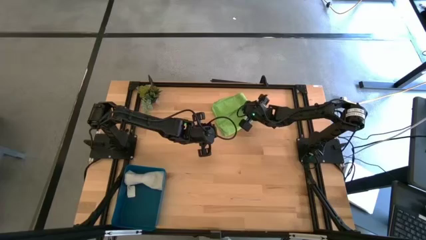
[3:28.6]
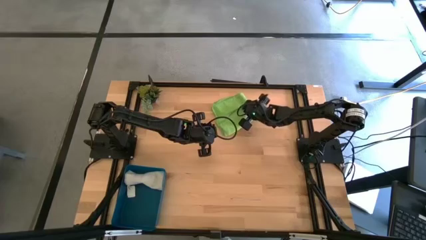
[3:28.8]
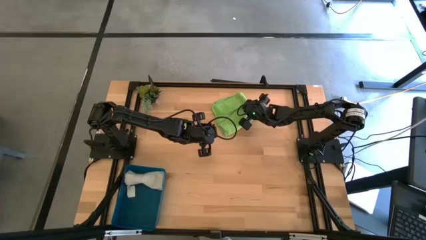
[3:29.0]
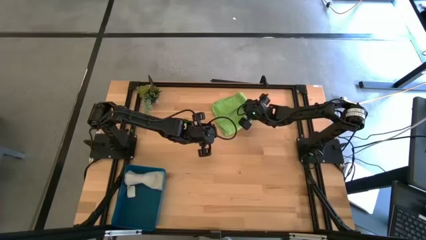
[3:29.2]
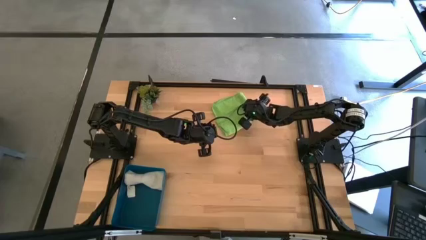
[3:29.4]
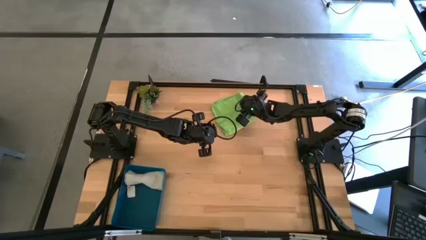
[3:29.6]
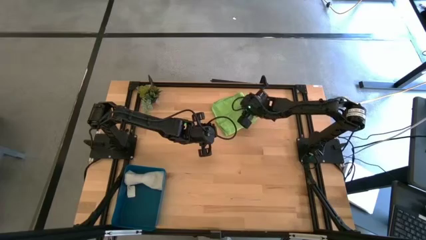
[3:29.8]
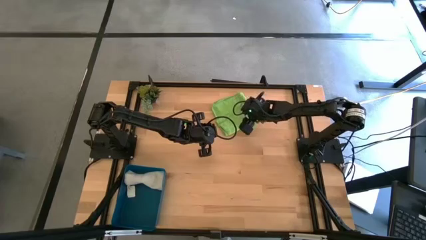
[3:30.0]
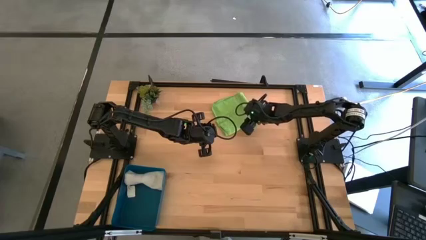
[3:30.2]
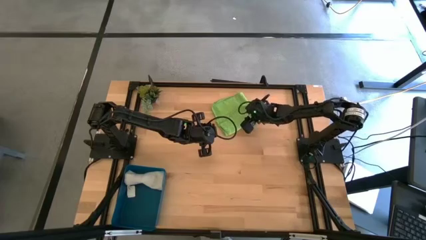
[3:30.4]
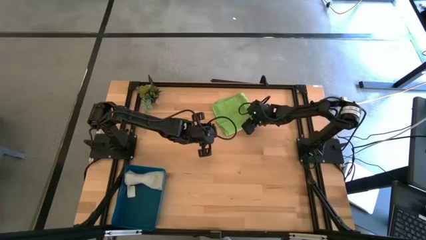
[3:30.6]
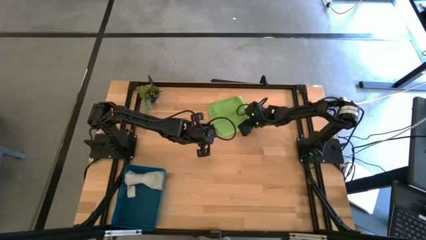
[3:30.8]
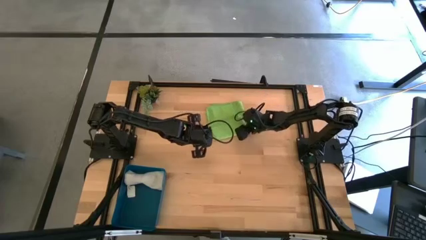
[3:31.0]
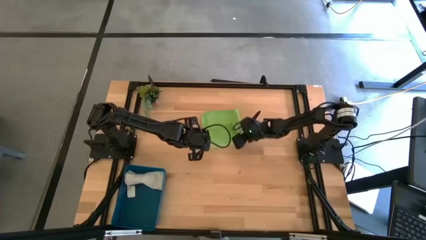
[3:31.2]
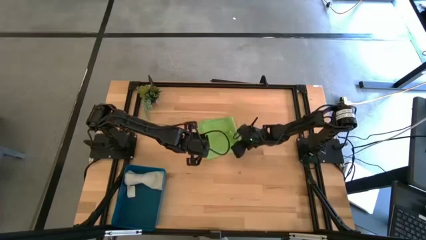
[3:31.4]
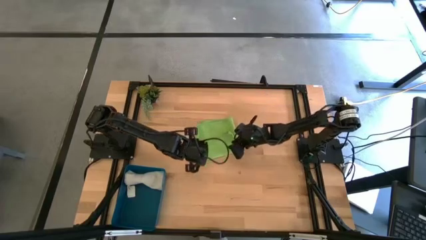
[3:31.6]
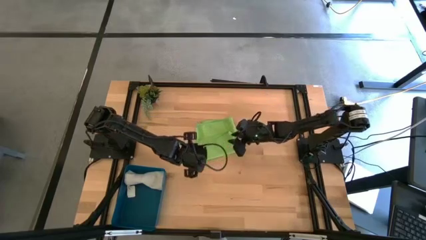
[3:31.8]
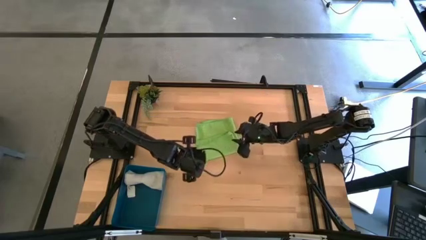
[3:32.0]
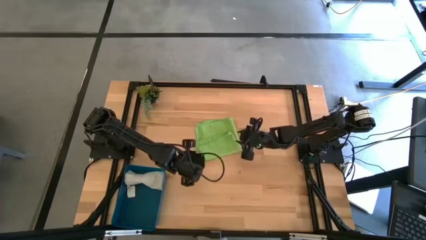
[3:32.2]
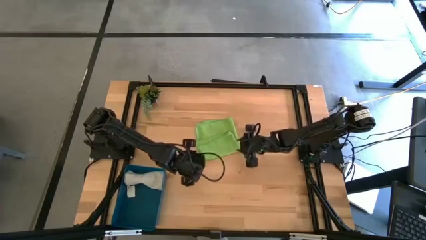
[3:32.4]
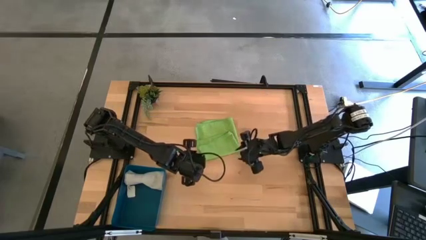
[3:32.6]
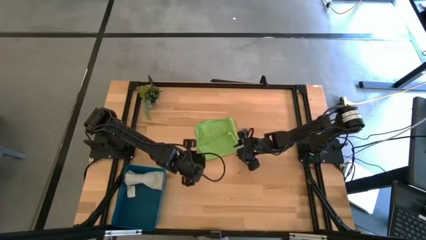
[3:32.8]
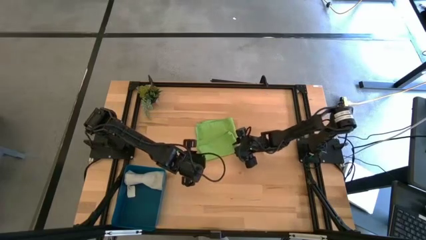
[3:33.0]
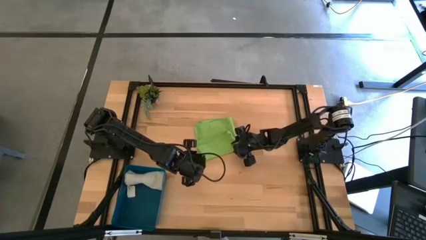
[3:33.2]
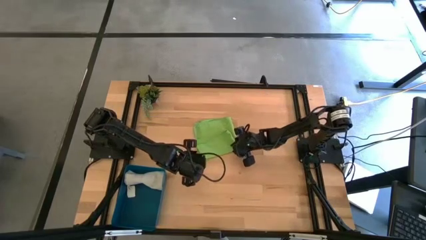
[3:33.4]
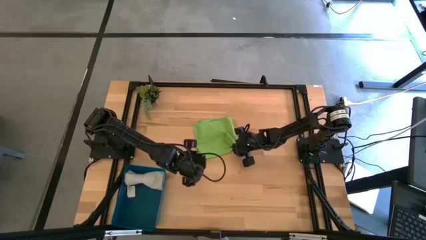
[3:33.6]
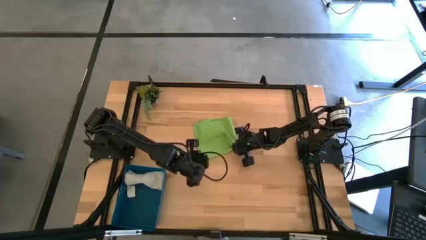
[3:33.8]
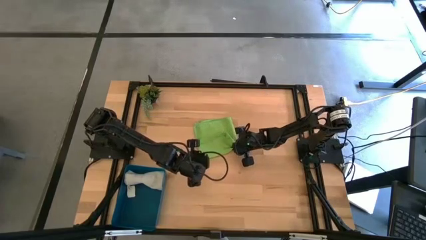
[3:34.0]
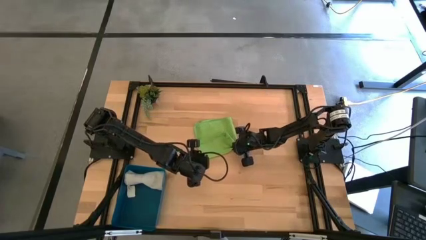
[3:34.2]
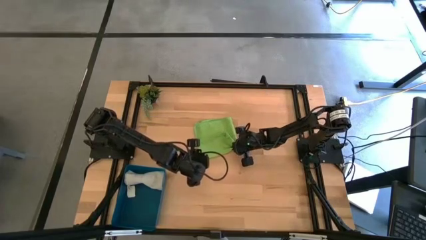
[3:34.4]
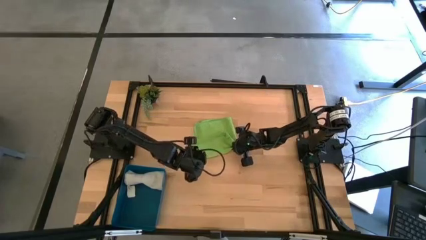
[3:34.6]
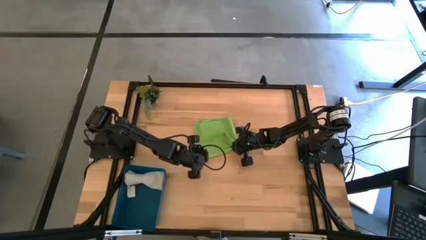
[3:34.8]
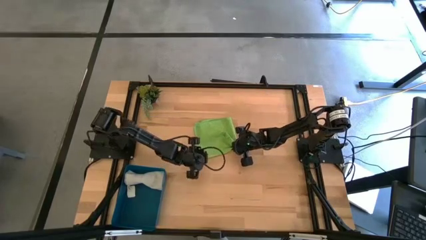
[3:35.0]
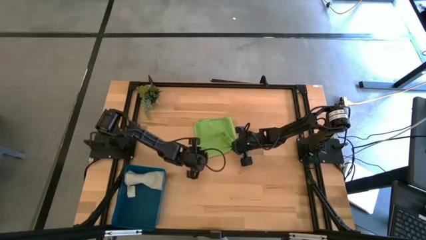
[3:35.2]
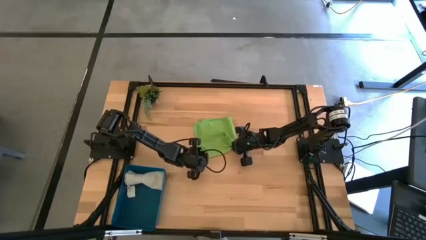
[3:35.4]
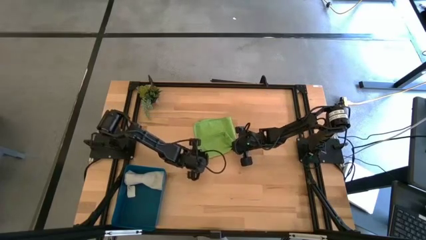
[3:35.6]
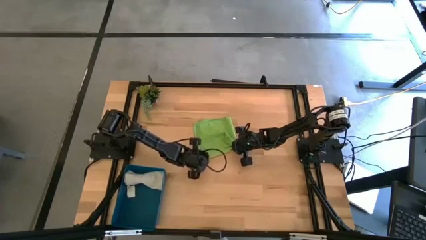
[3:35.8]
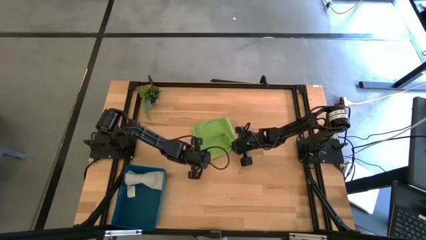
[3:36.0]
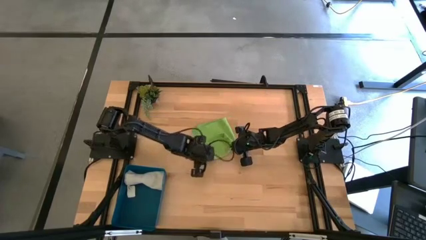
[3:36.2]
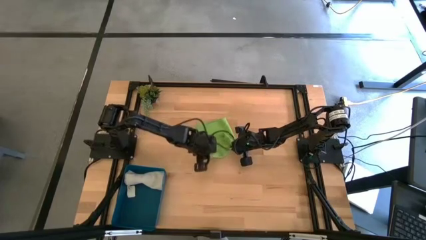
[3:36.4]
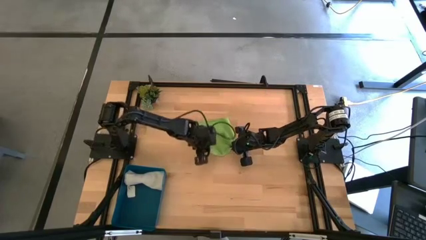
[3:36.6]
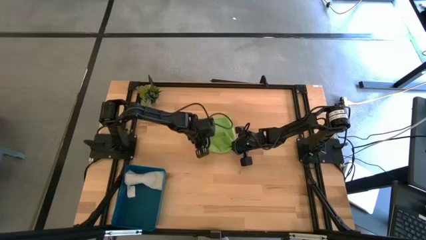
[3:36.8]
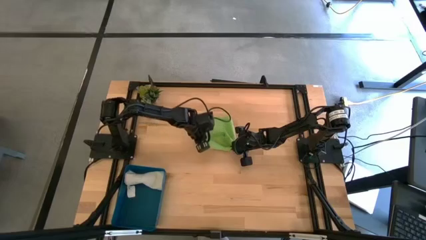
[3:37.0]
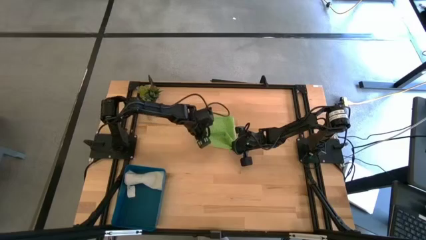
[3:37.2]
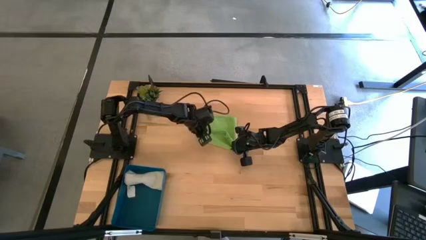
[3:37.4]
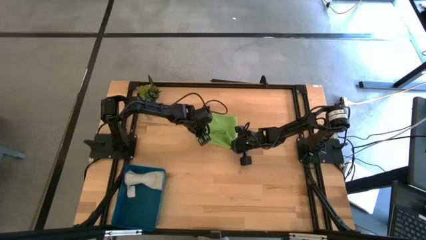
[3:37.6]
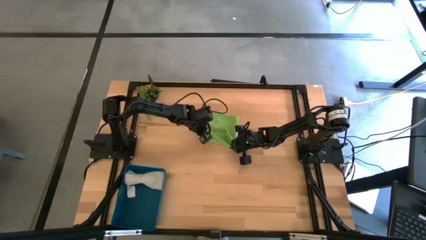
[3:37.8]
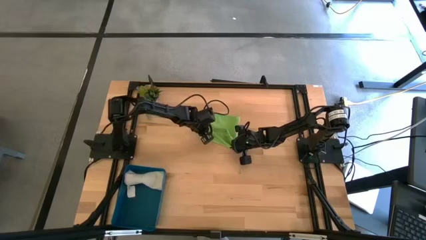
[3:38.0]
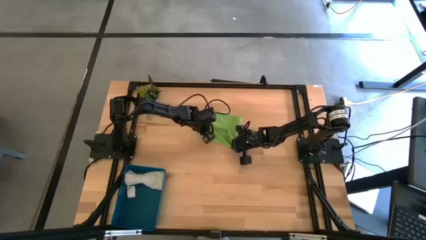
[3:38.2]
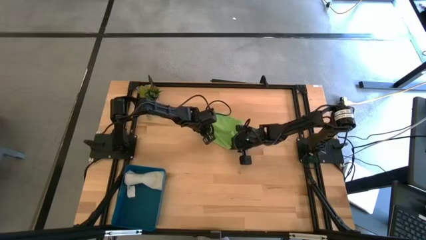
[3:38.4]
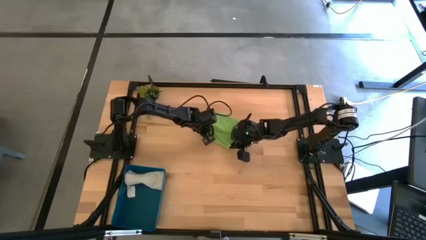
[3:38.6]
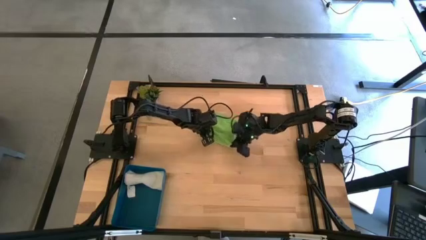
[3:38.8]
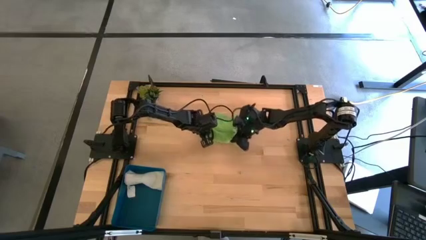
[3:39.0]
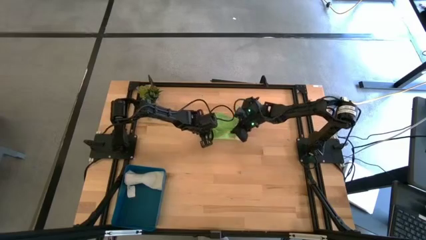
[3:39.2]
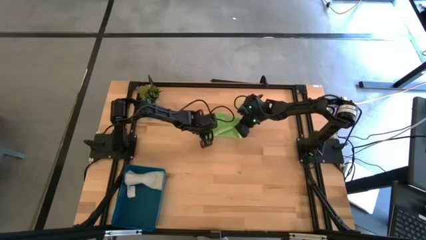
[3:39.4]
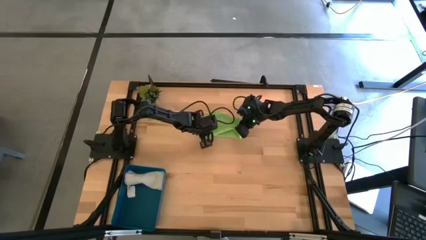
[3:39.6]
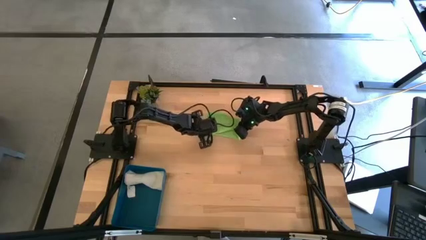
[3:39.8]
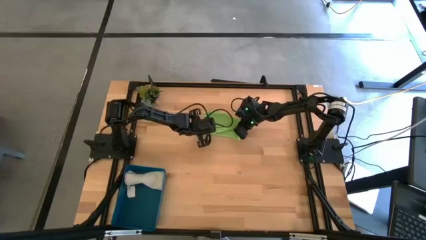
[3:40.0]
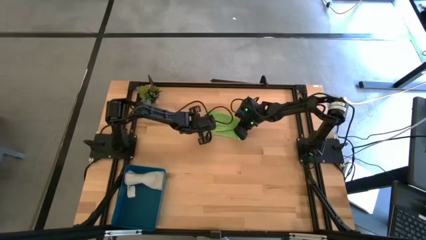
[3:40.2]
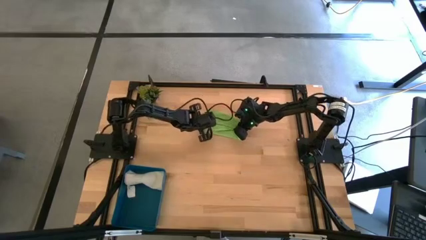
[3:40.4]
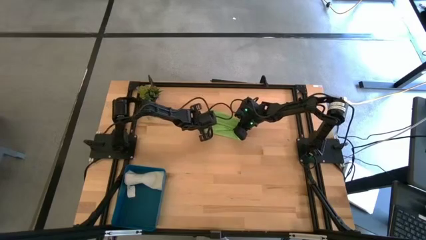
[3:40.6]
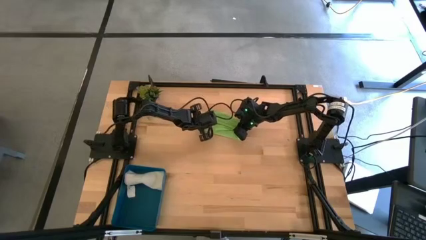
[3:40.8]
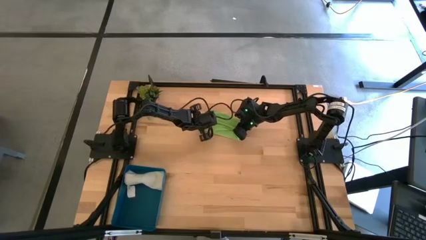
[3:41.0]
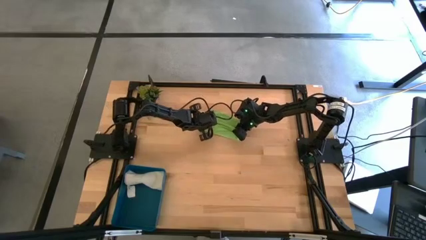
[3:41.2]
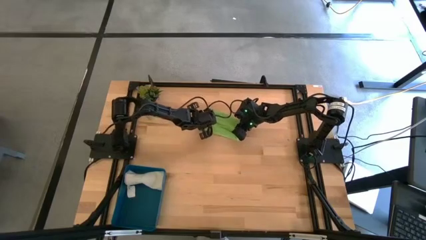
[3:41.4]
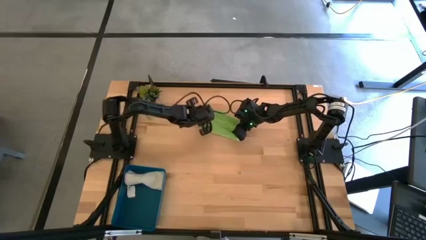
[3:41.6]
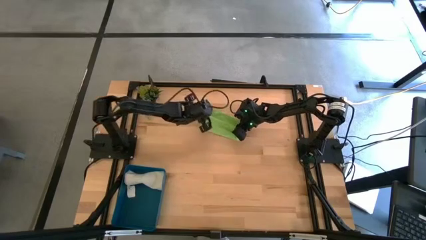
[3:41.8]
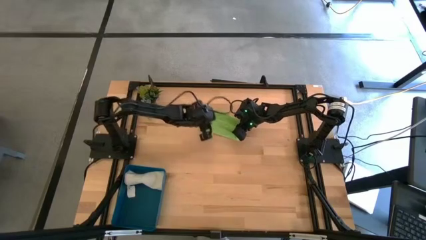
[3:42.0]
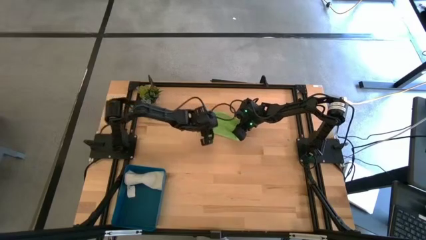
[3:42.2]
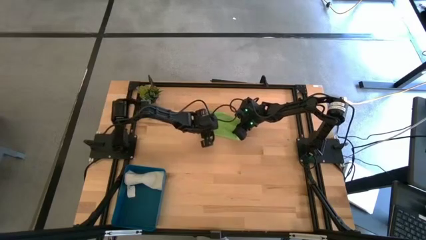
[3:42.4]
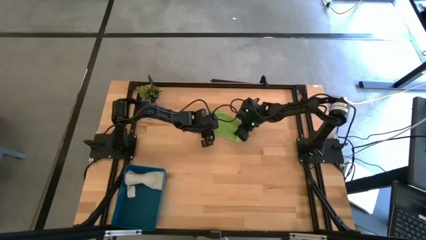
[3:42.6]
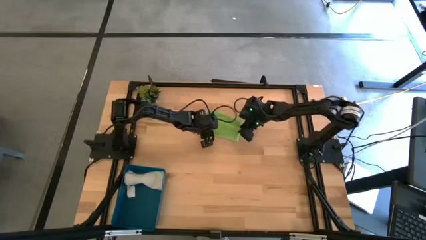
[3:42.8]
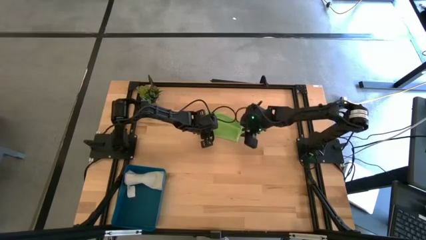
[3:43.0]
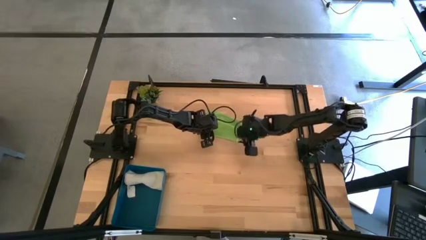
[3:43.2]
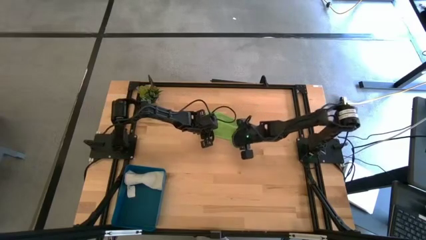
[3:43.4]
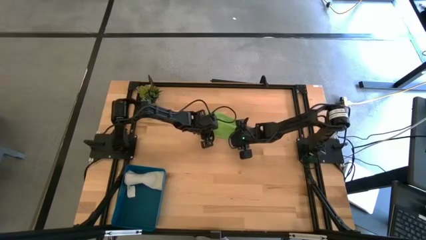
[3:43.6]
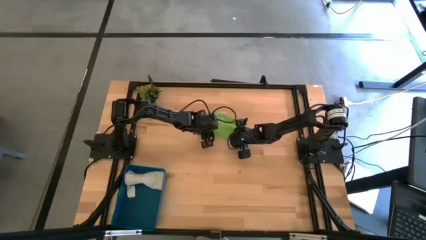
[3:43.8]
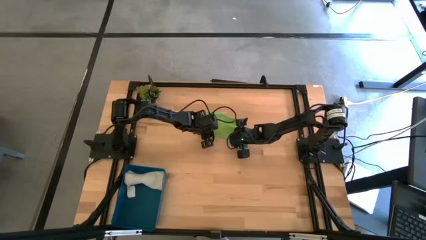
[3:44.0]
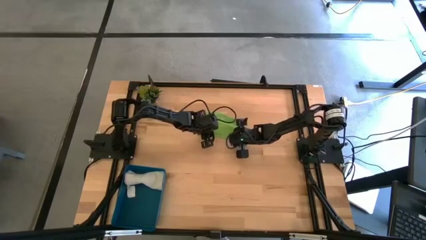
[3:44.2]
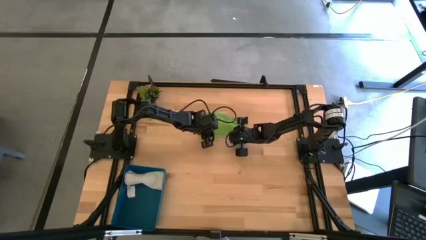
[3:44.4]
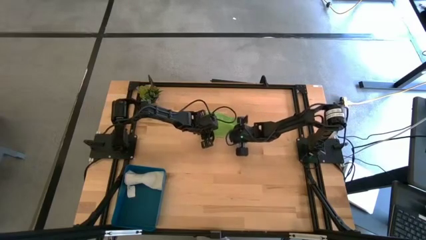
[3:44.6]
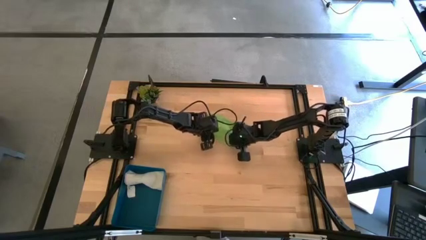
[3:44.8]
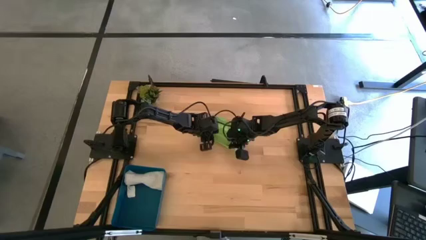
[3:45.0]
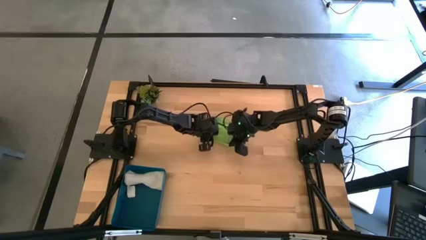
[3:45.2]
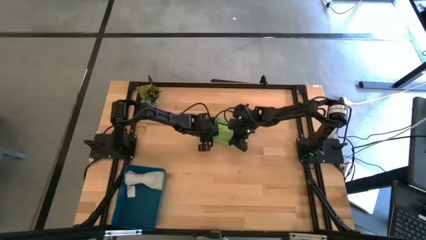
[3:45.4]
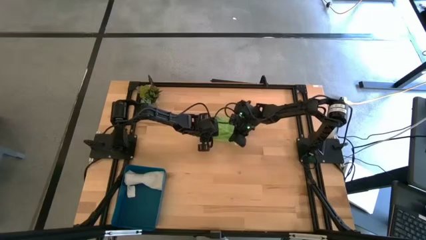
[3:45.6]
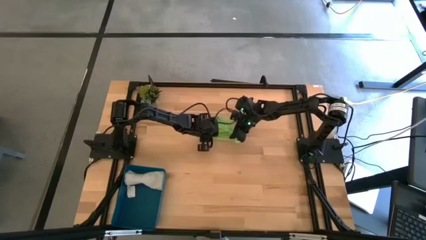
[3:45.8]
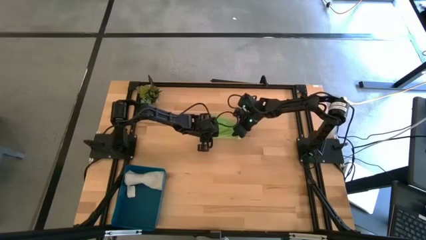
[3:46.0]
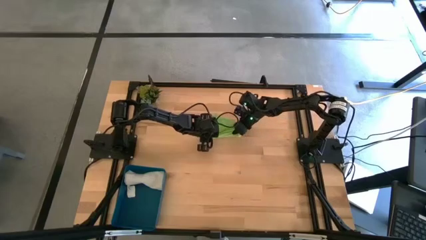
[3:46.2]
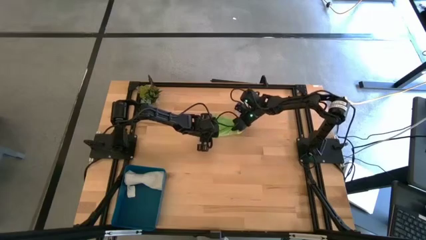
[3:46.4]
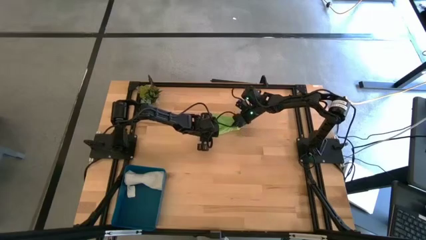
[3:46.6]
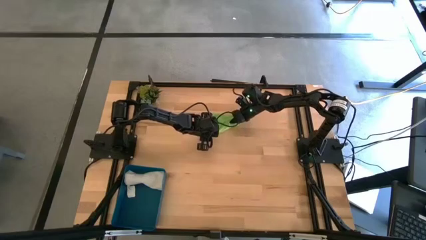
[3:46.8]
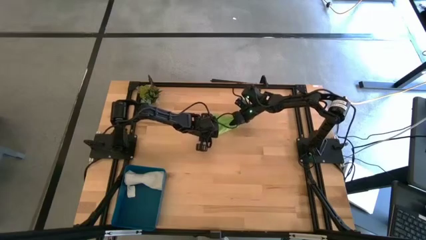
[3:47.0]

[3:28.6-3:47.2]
Task: Roll microfiber towels into tight, uniform cylinder then place into a basket
Roll the green towel
